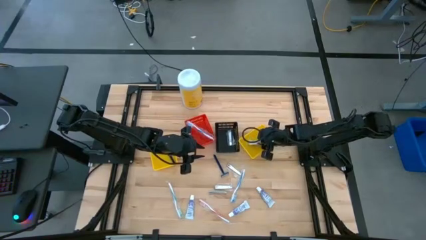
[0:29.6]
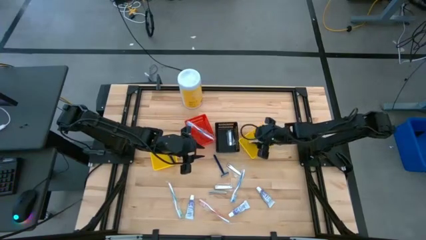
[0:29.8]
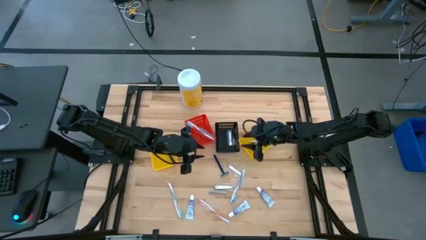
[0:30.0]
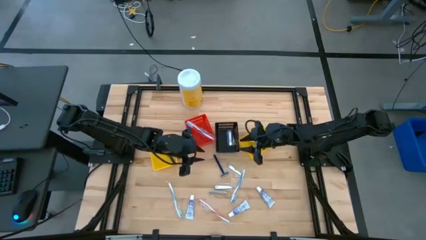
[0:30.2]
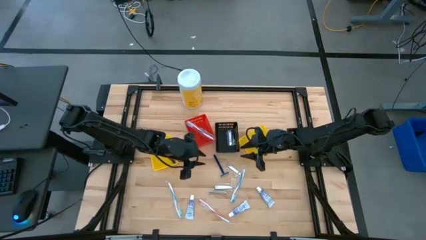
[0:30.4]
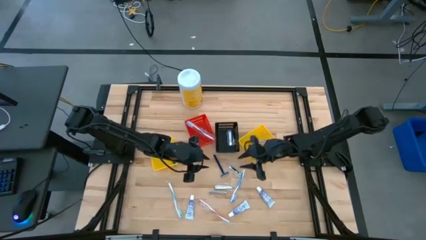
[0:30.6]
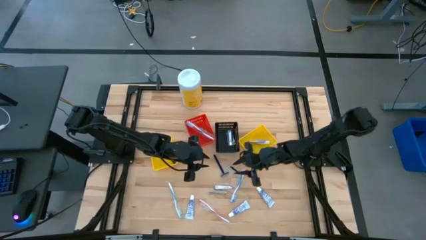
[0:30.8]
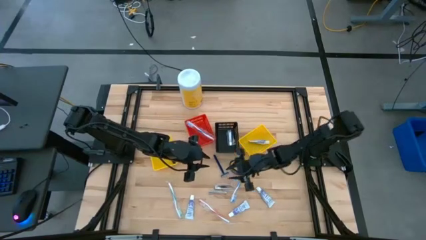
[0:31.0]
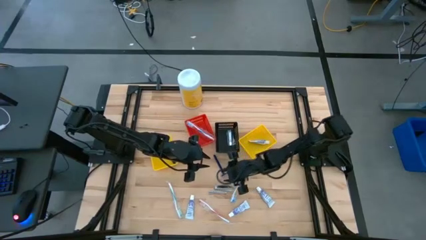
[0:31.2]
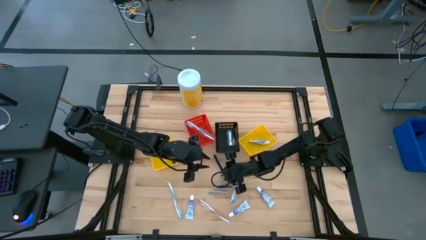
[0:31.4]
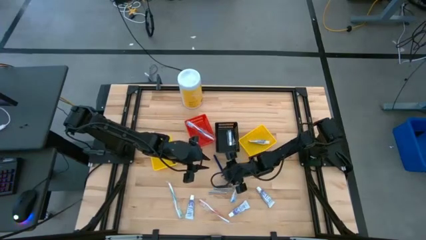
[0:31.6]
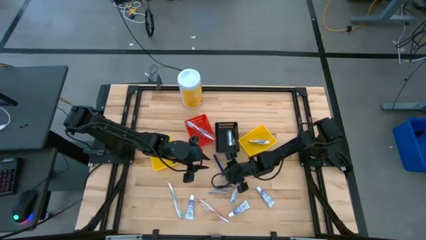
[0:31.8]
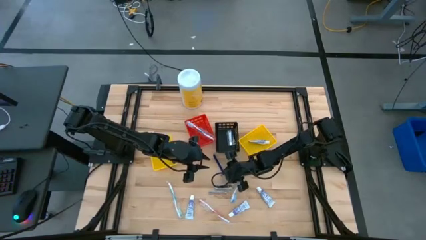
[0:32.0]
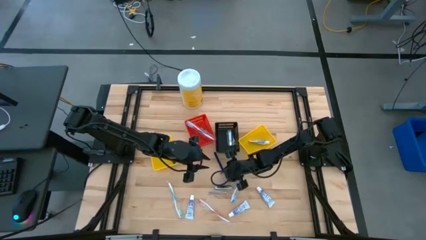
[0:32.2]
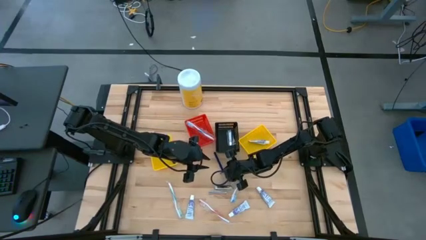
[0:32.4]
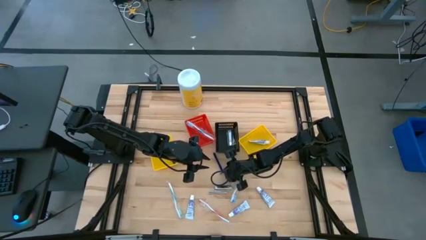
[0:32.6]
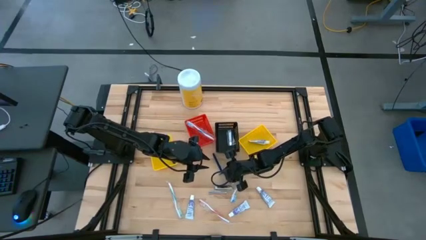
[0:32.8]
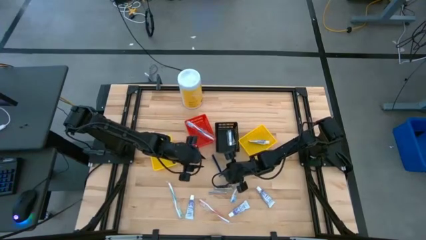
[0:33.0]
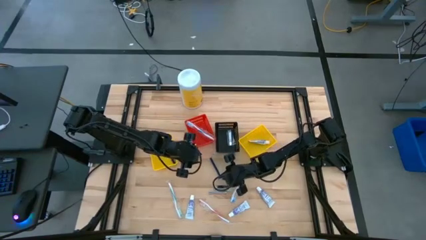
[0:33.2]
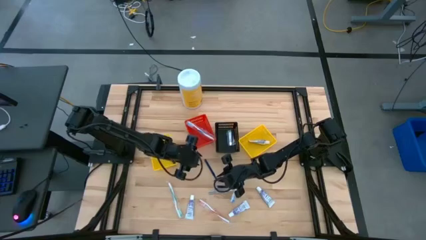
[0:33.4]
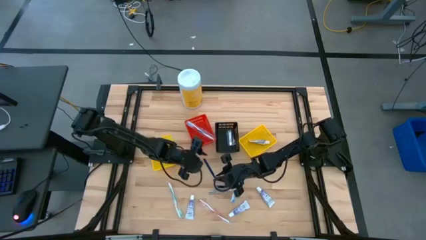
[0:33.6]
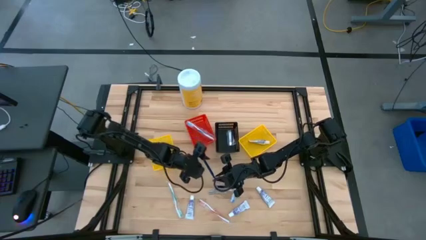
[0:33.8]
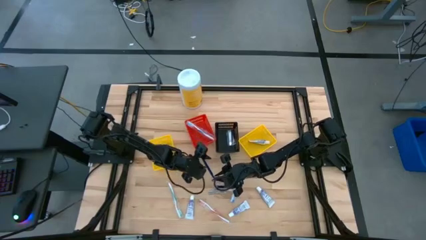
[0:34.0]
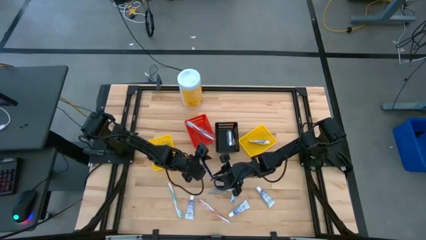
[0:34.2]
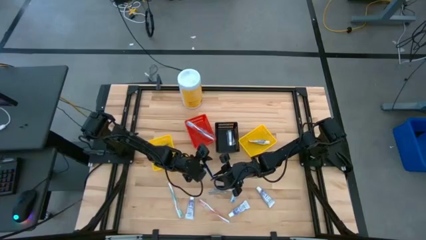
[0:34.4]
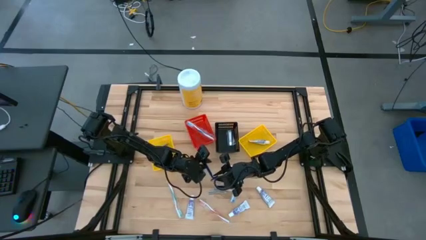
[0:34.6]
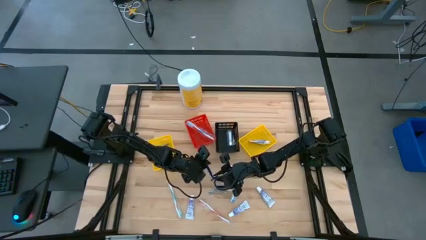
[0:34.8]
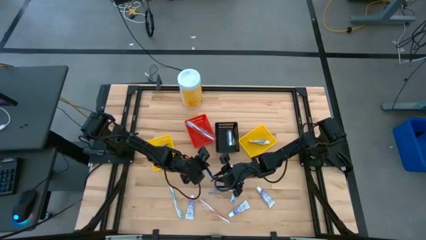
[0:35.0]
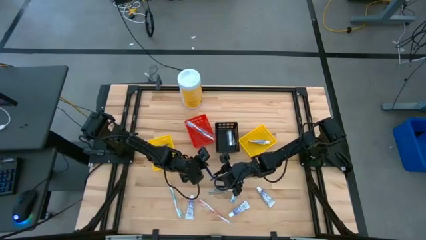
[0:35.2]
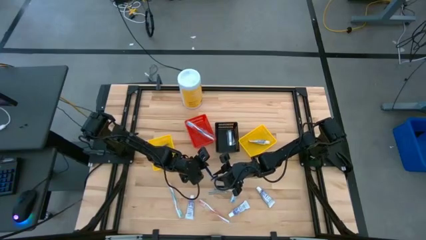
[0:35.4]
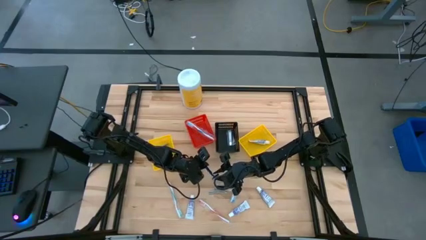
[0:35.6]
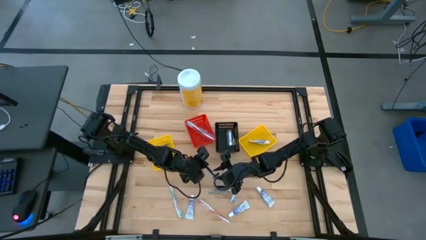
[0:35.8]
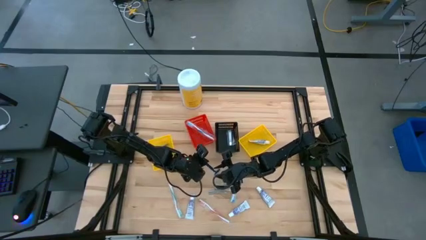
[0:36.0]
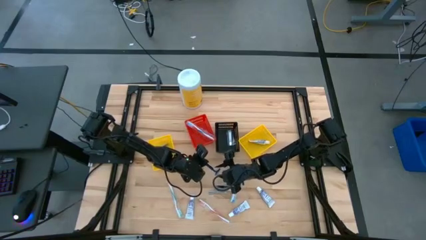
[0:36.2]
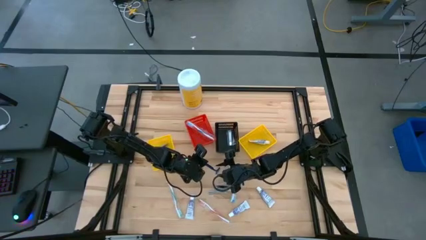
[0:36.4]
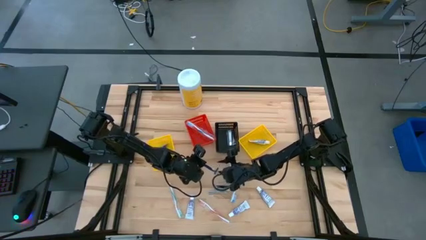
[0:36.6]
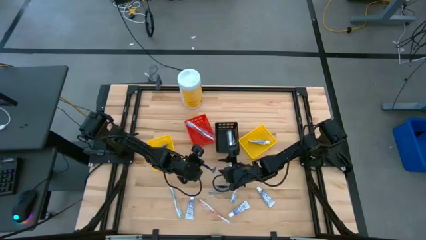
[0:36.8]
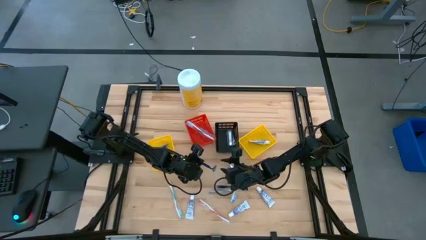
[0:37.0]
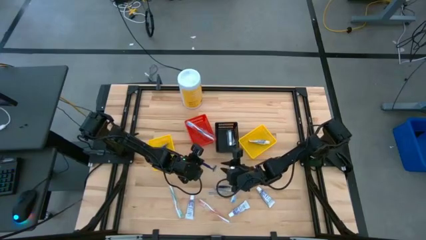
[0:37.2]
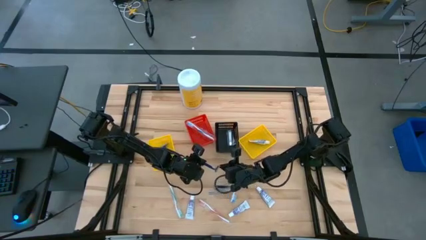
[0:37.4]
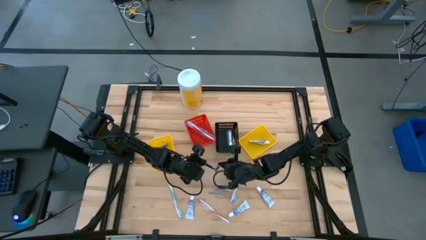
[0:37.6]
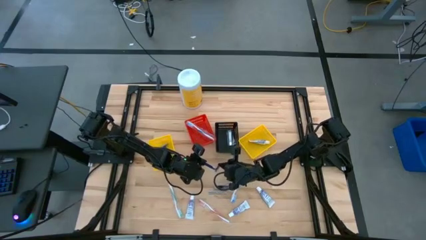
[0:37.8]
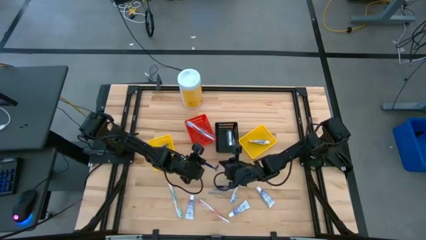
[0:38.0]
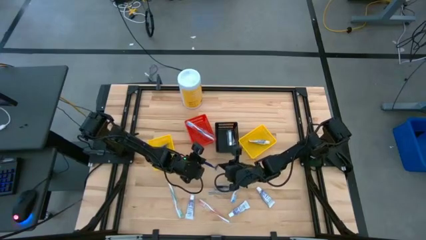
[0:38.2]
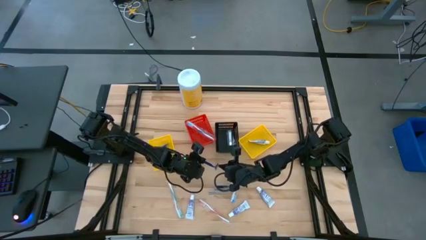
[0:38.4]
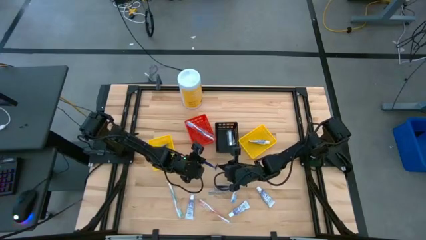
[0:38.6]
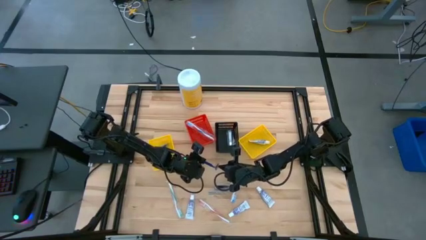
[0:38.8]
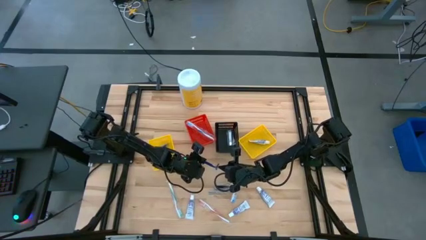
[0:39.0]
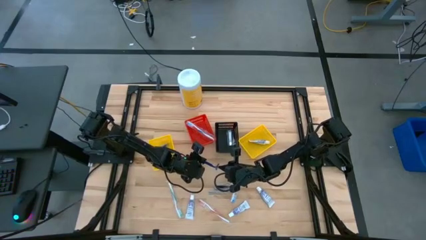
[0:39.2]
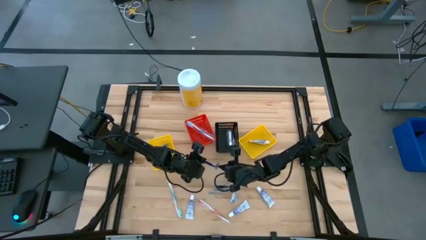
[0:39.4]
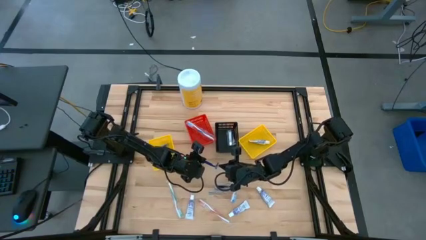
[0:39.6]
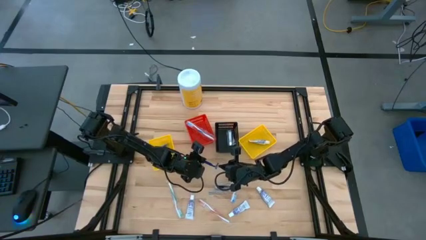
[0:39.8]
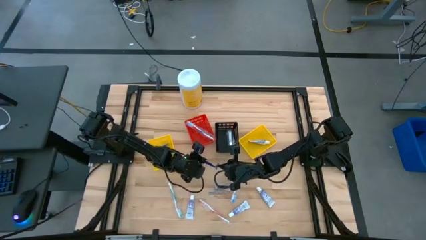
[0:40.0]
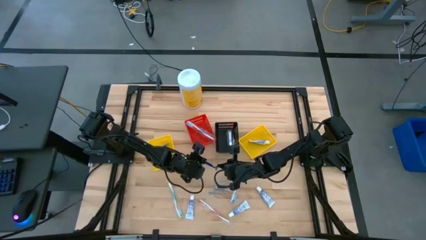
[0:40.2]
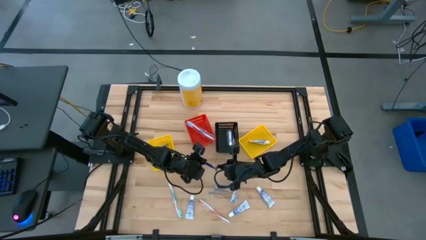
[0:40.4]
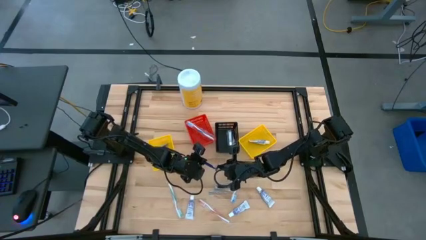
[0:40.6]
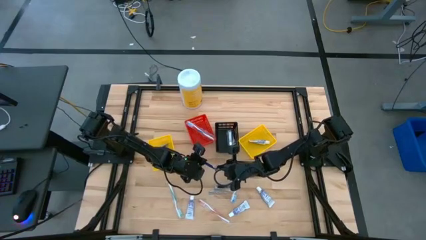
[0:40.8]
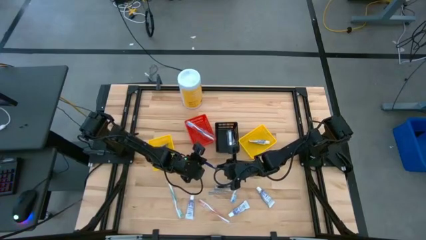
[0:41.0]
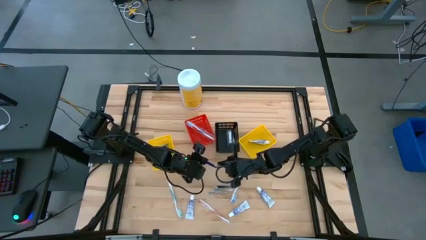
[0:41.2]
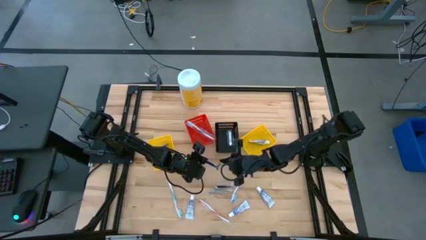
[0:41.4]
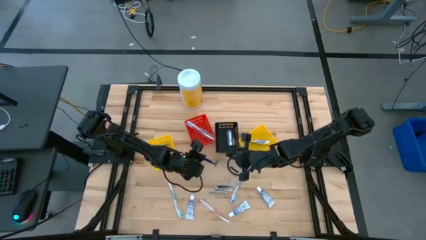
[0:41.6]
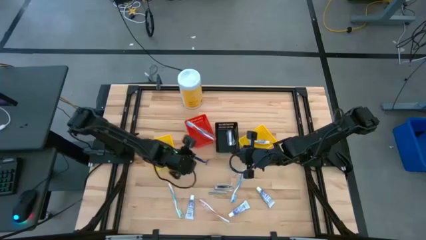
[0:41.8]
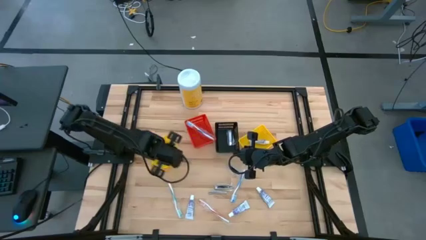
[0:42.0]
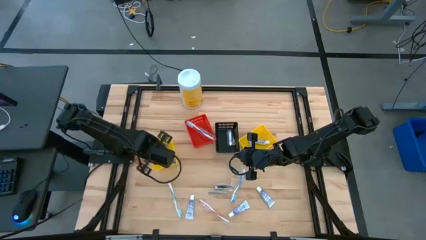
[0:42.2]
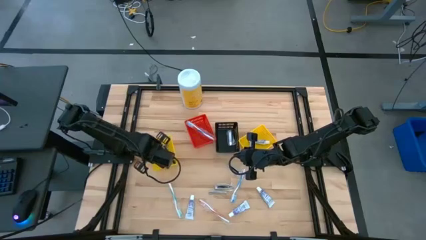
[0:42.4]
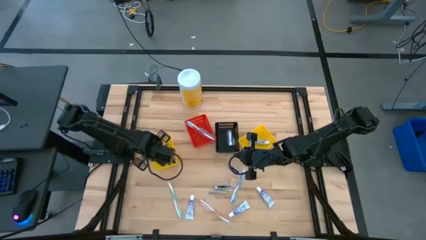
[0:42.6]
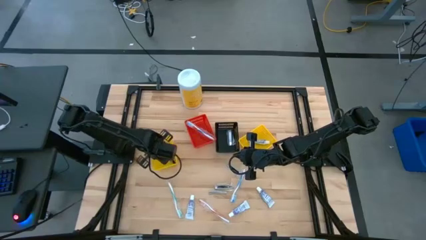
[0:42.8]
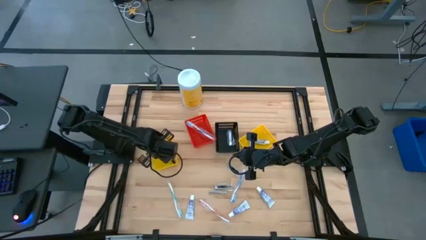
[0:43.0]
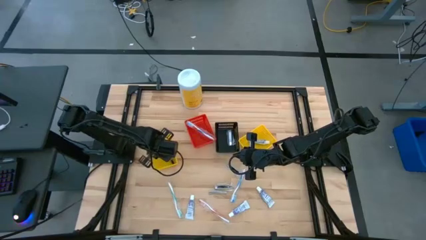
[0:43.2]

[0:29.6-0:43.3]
Task: Pick & Place Travel size toiletries
Put the blue razor into the left yellow bin

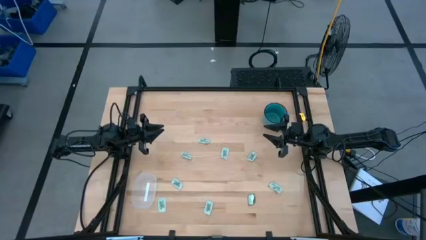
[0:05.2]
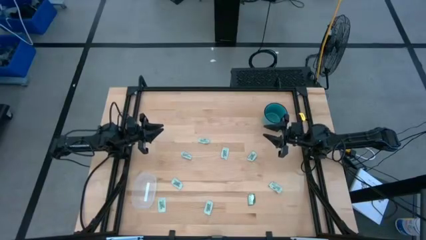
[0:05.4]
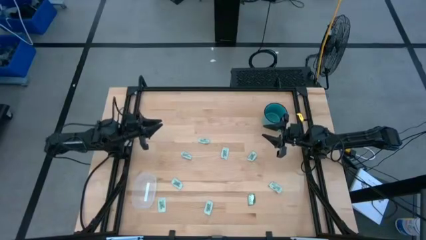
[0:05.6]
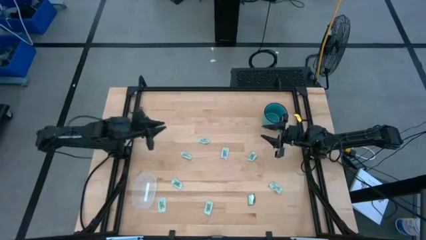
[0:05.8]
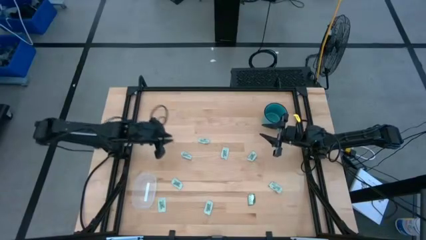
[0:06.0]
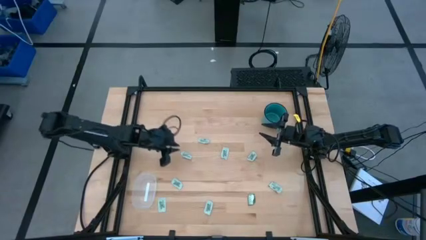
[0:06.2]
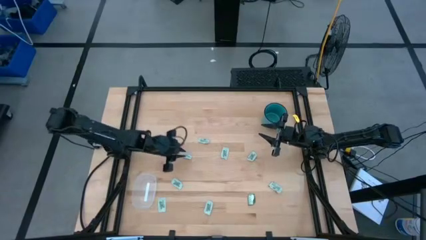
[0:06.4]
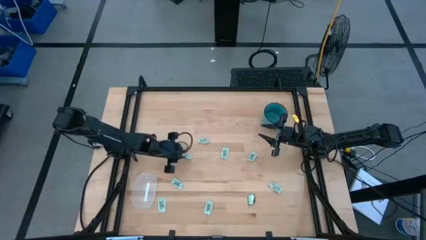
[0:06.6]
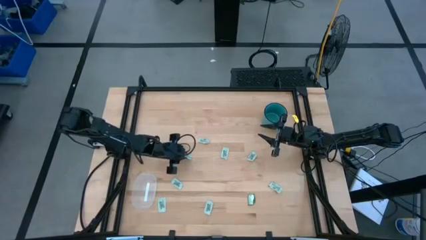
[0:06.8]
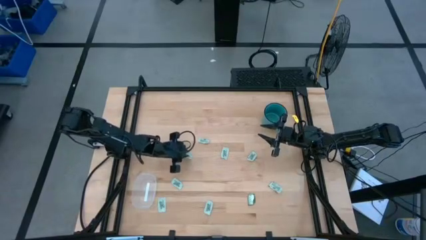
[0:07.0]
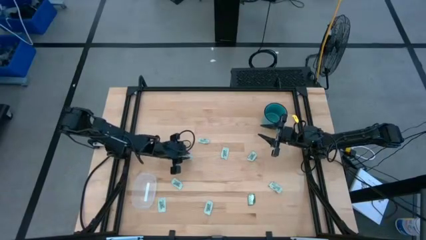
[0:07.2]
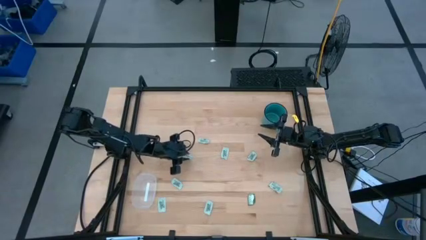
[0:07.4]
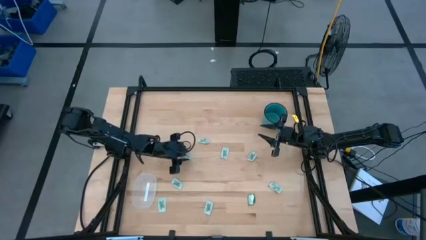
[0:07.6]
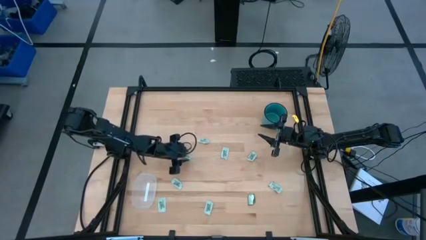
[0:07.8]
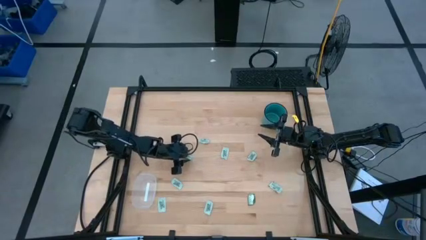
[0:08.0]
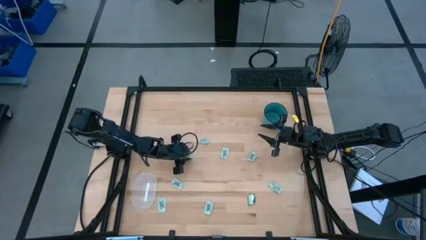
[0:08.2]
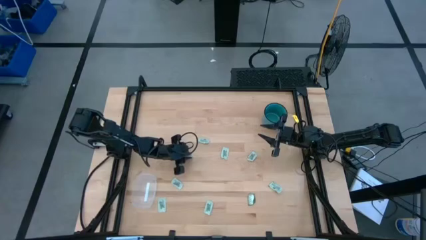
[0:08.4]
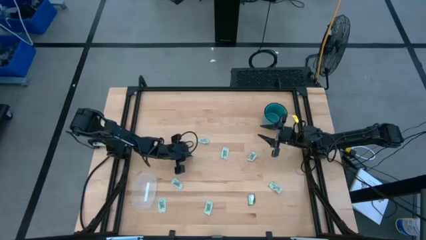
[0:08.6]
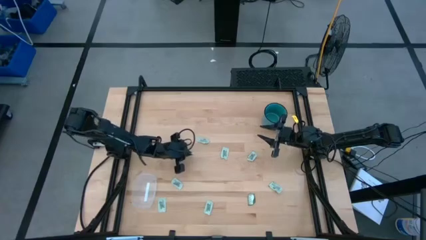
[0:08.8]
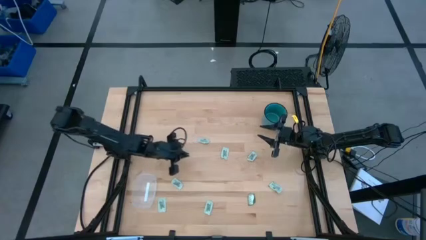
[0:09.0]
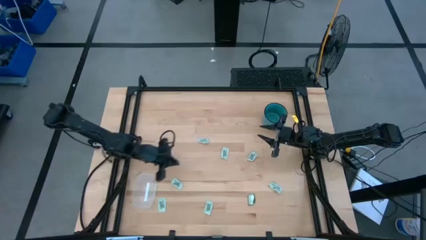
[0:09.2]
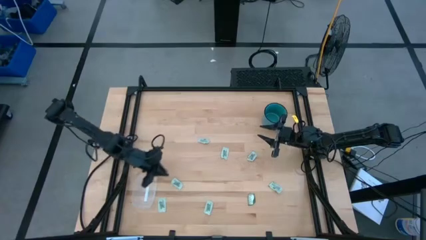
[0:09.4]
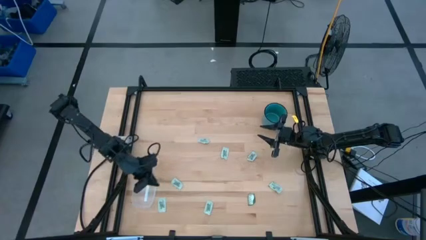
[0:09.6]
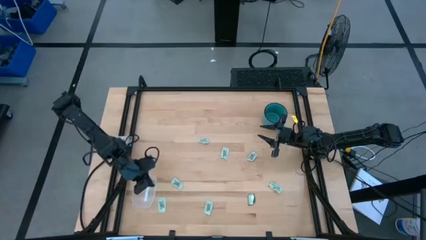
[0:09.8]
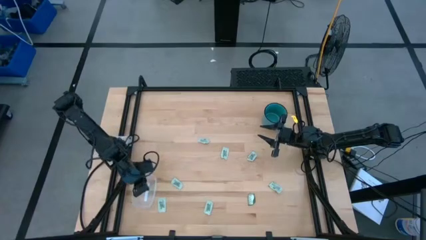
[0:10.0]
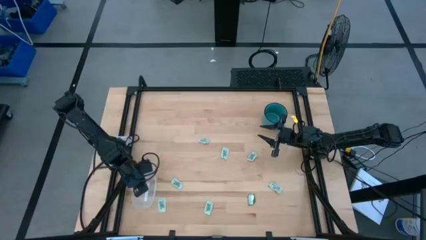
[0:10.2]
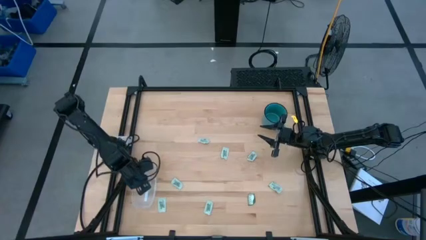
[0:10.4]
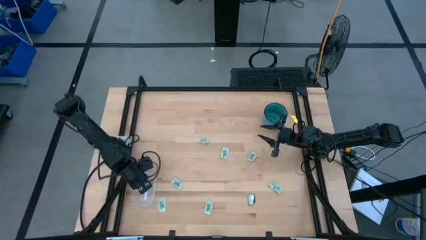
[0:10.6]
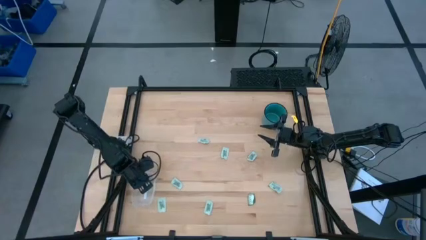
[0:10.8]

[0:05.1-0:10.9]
Task: Pick and place Stevia / Truvia into bins
Put the white stevia packet into the transparent bin
